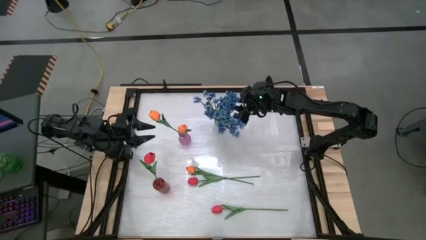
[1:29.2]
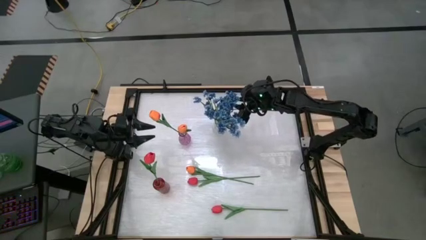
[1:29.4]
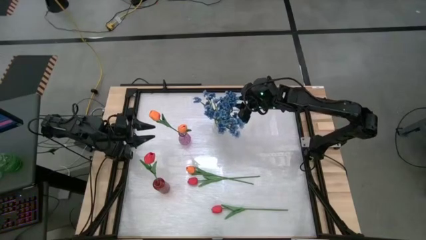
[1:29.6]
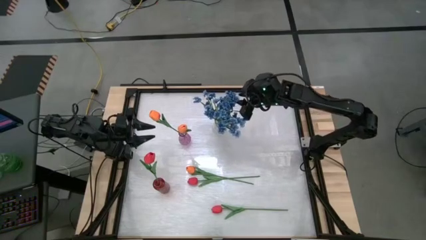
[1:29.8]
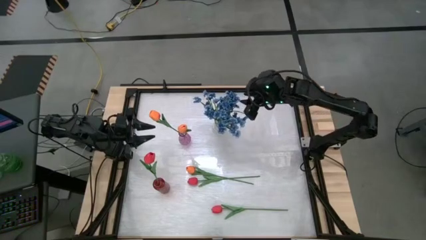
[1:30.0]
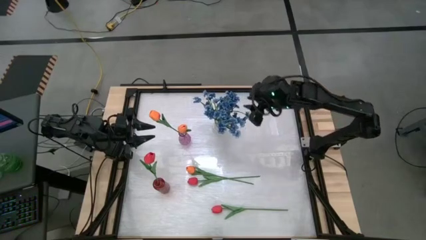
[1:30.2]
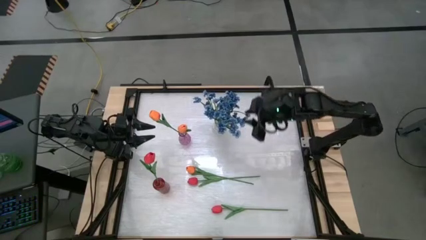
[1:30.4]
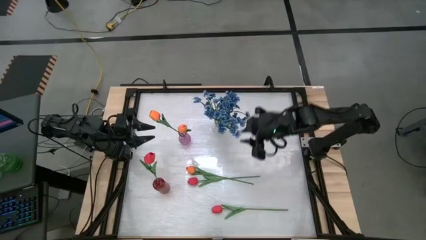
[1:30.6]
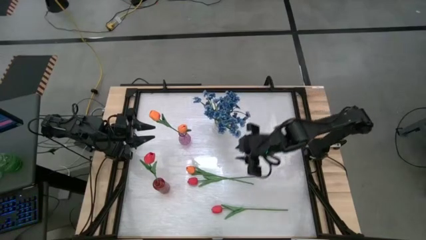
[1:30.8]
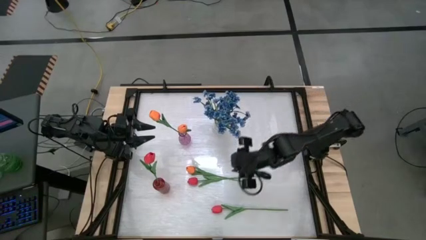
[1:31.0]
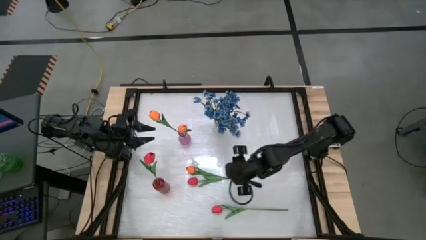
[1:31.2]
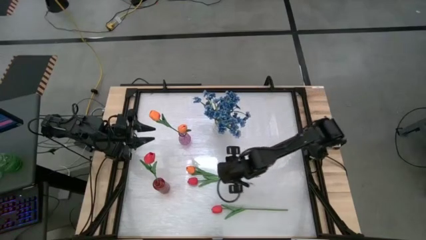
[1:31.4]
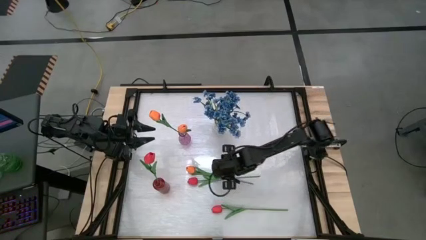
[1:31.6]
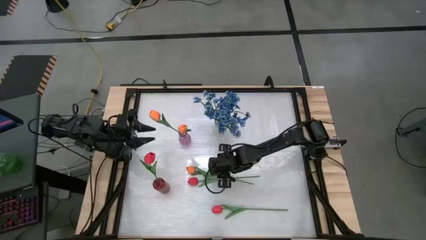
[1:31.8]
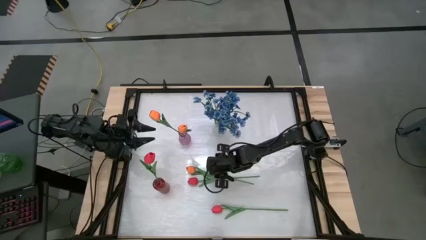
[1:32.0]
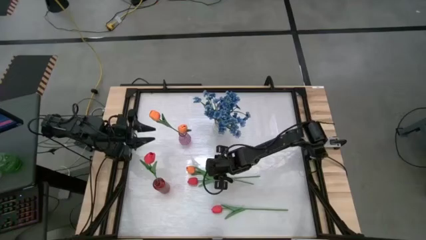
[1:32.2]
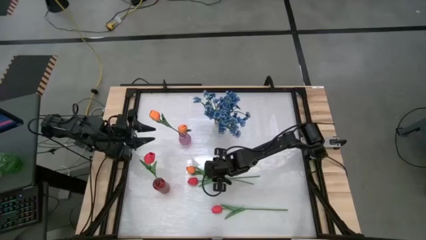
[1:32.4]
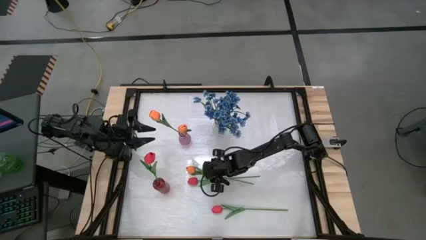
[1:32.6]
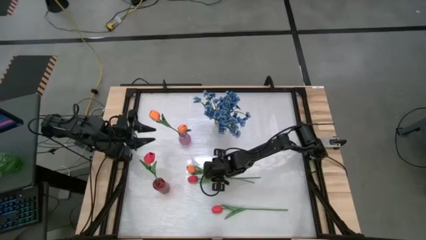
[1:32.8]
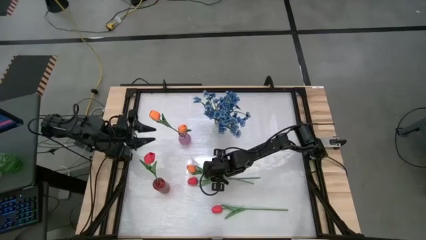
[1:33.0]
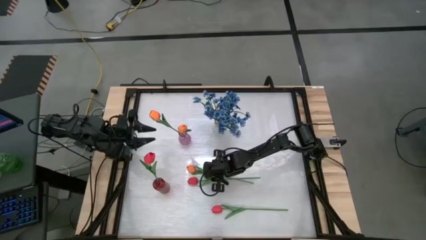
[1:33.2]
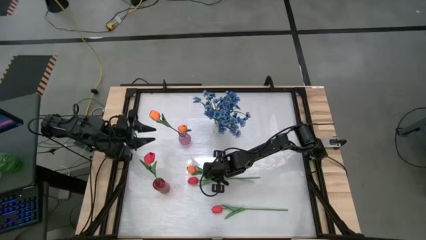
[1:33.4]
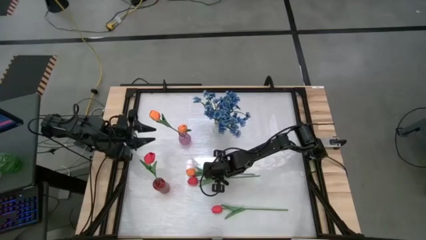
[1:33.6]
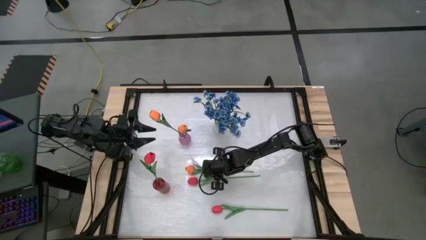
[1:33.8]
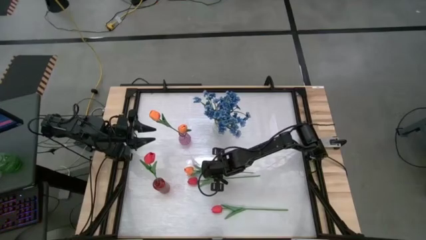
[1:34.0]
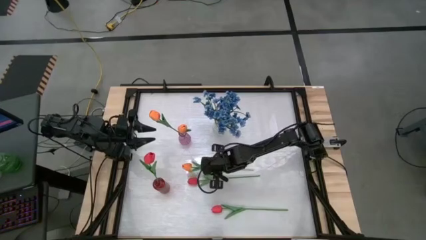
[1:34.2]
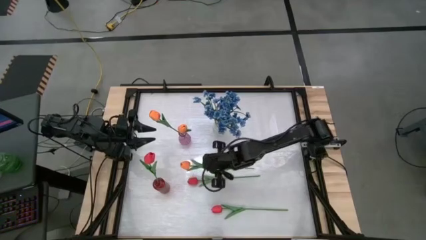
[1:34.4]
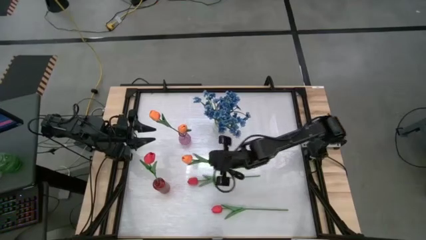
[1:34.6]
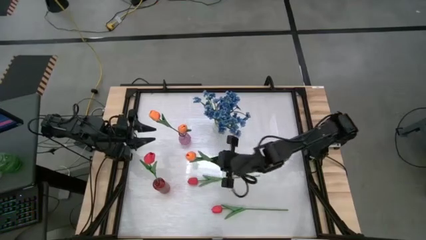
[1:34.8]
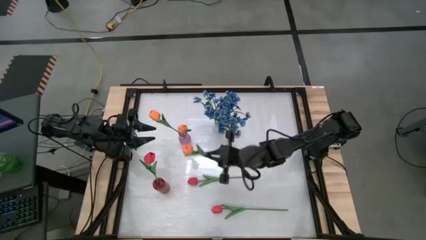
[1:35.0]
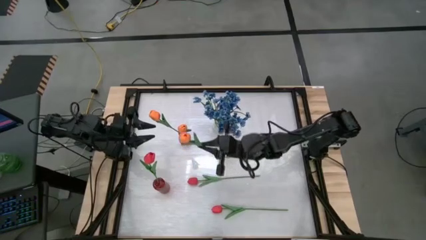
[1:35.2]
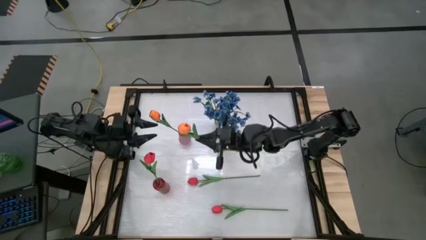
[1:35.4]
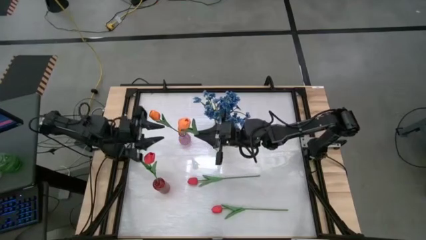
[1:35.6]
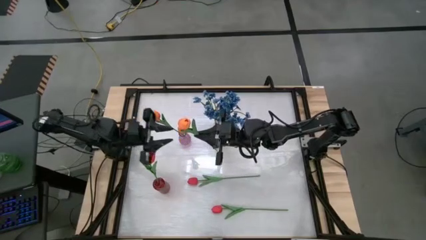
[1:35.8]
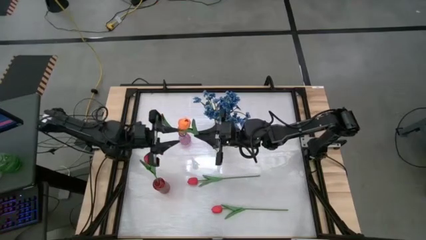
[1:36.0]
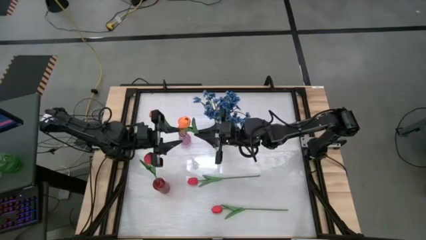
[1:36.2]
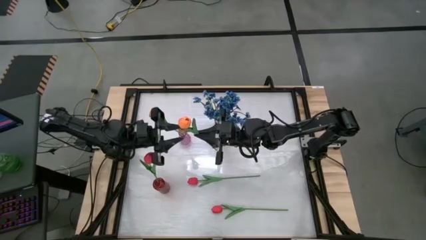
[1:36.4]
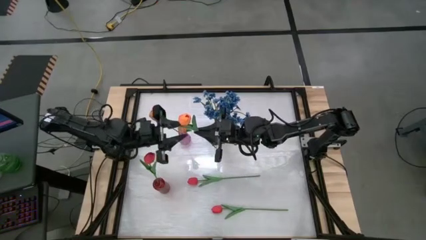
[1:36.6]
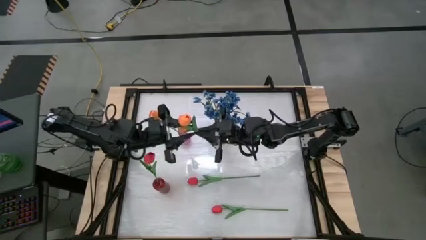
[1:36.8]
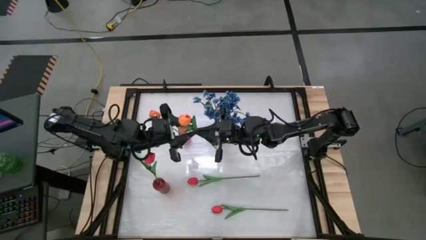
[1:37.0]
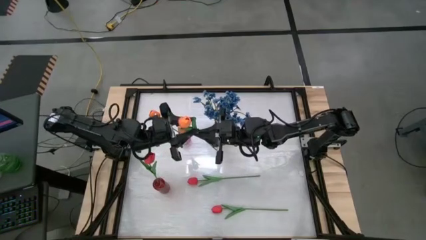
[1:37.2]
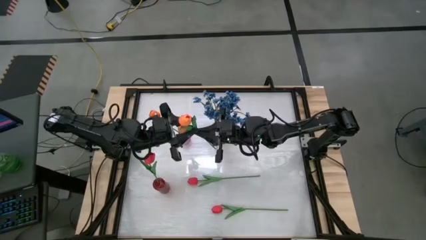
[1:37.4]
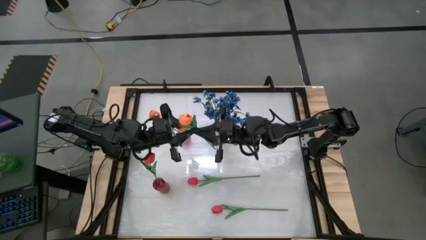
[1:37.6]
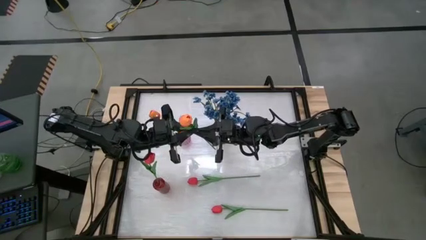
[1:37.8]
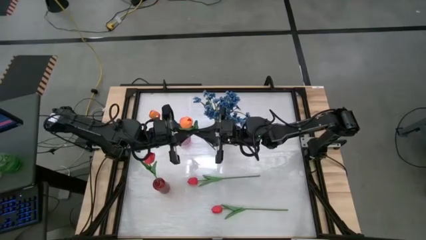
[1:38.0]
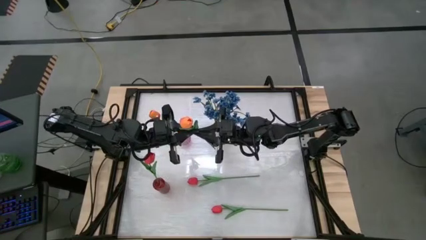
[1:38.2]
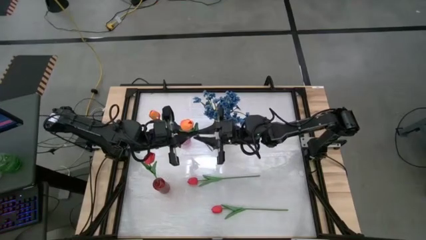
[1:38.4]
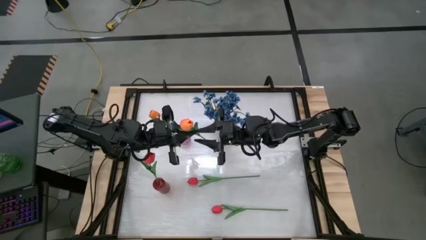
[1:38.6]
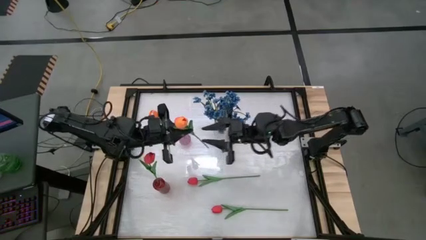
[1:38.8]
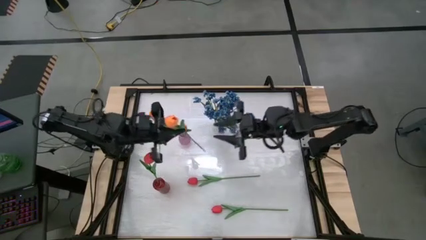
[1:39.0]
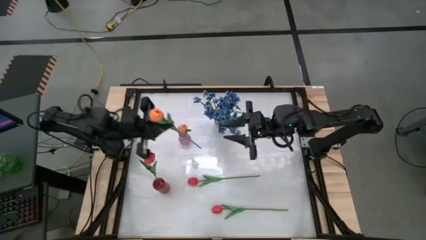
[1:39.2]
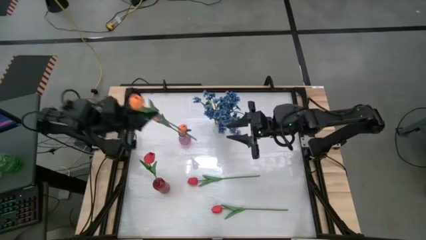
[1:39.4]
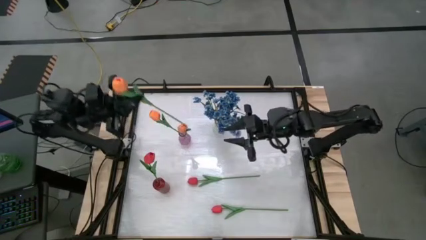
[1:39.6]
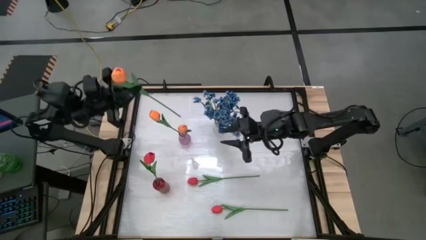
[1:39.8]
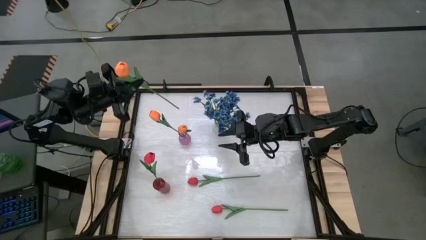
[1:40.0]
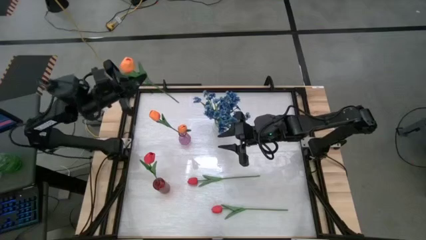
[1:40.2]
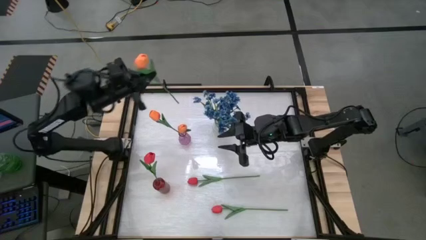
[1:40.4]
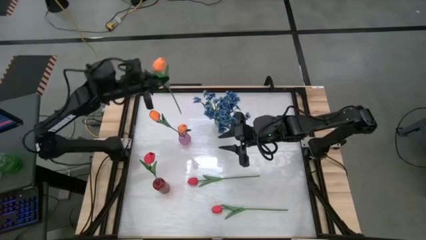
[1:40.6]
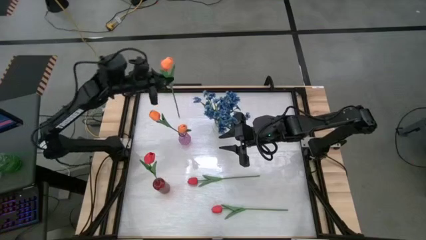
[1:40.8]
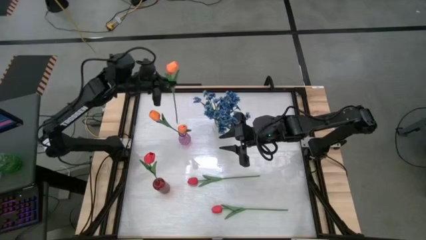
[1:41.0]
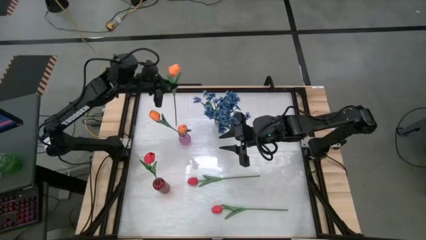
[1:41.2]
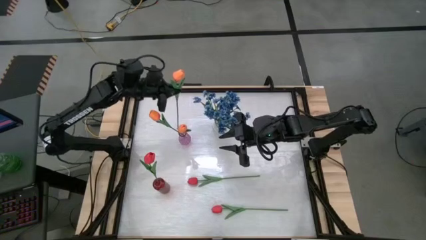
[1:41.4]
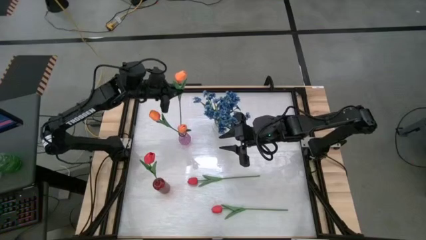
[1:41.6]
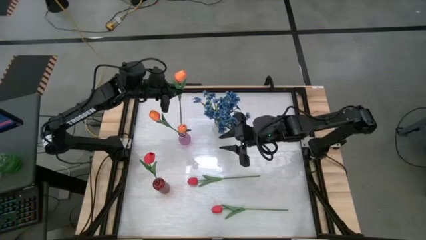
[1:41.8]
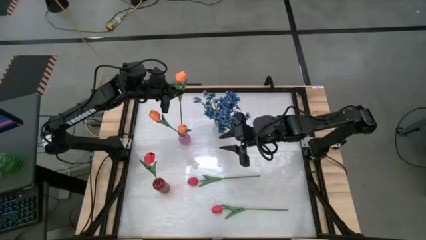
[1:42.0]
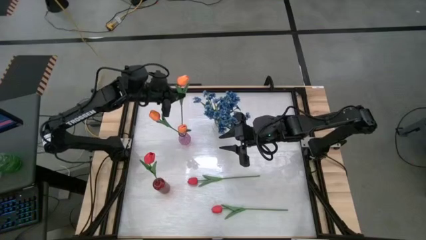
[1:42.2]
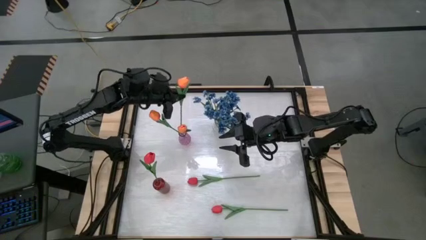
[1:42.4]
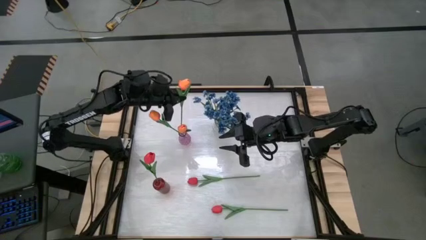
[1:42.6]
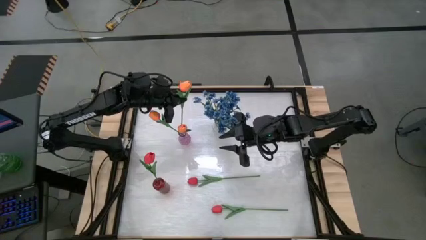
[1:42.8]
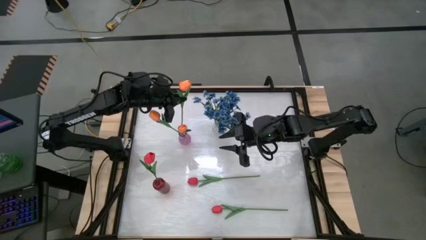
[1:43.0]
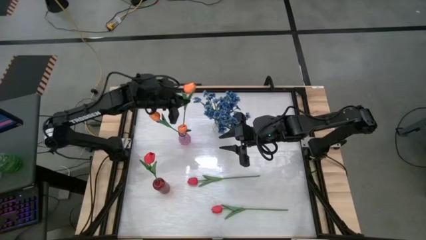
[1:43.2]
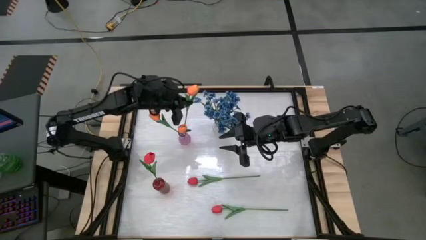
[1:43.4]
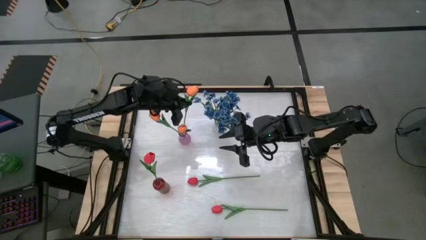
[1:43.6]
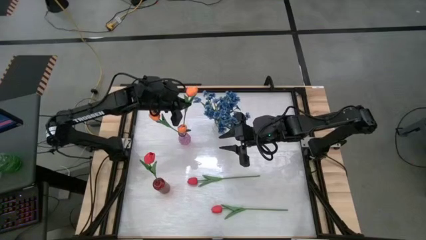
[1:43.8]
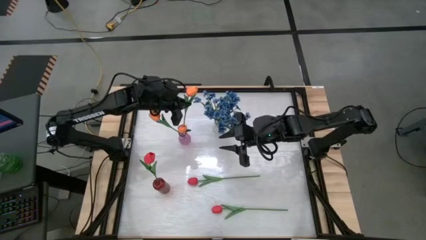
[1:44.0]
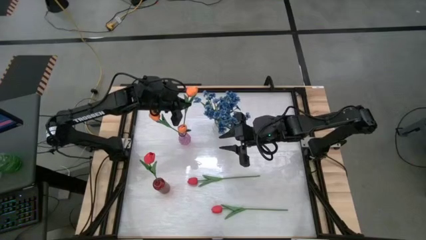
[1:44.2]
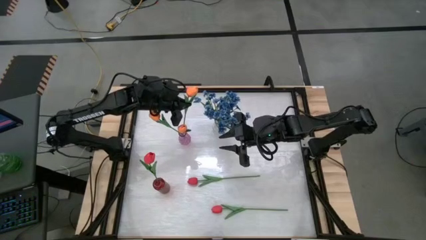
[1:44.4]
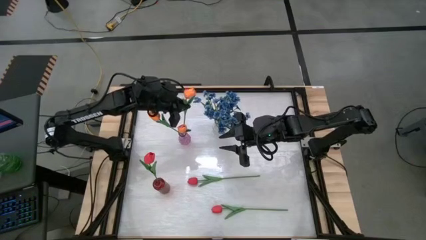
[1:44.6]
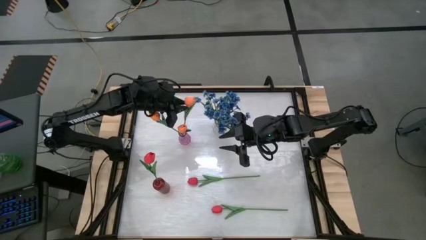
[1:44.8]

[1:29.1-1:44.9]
Task: Sort flowers into vase by color
Put the orange tulip into the purple vase
